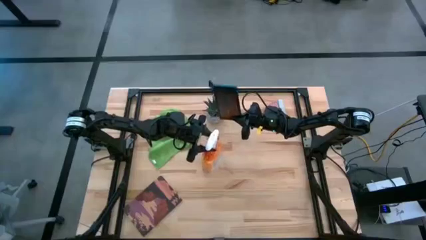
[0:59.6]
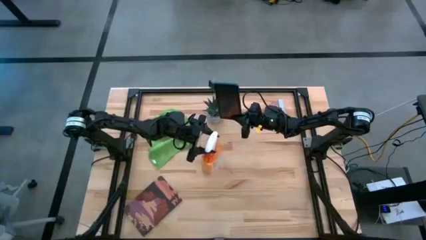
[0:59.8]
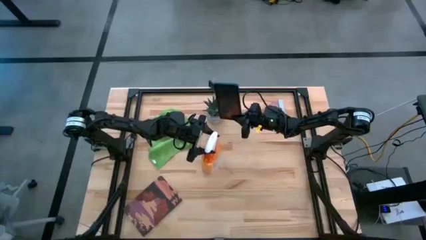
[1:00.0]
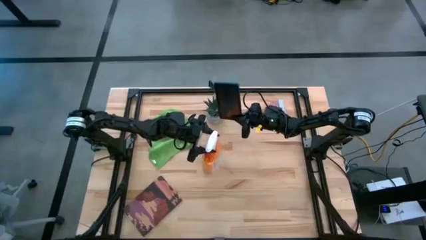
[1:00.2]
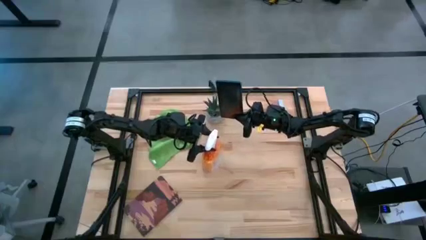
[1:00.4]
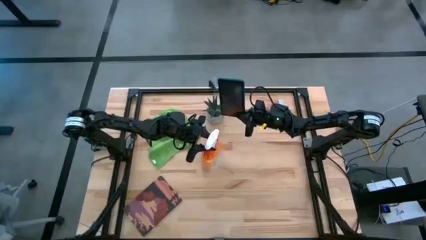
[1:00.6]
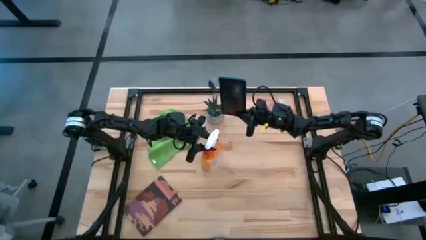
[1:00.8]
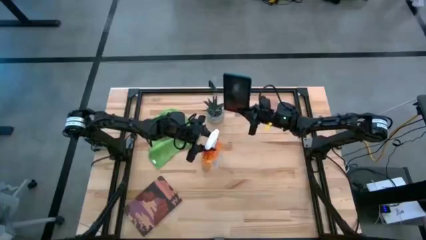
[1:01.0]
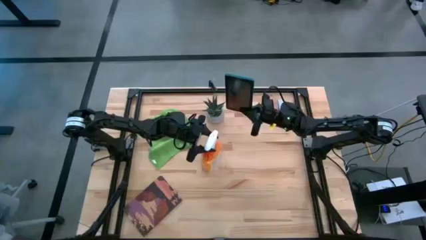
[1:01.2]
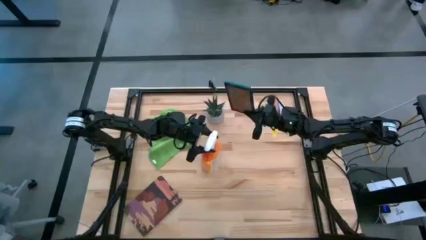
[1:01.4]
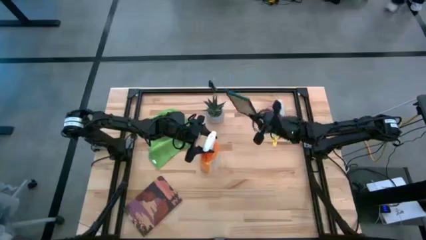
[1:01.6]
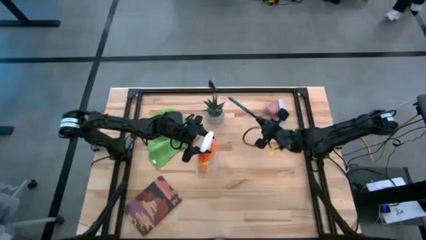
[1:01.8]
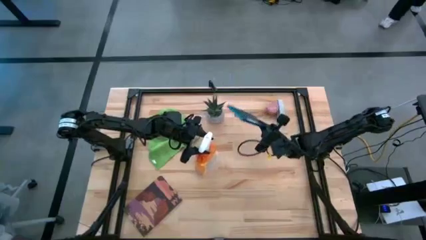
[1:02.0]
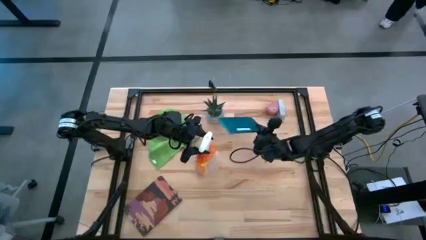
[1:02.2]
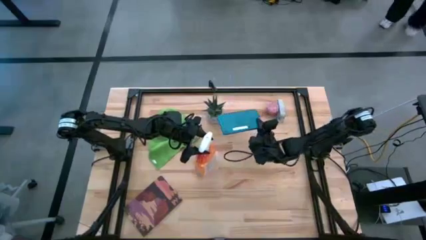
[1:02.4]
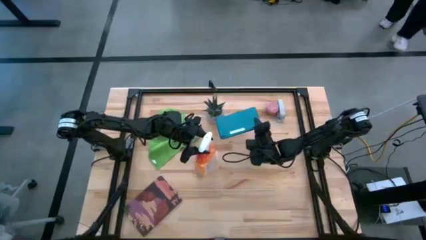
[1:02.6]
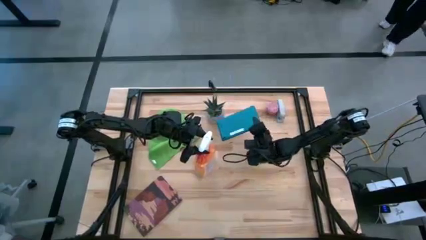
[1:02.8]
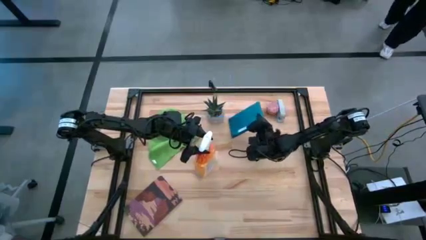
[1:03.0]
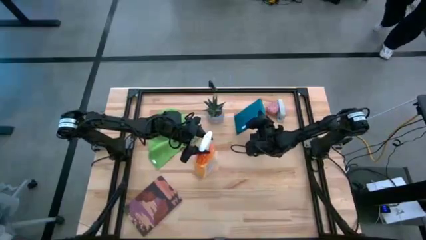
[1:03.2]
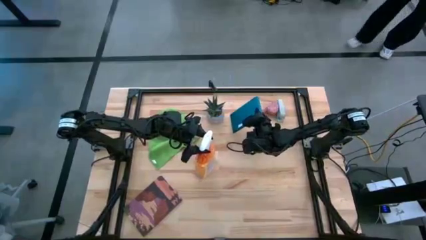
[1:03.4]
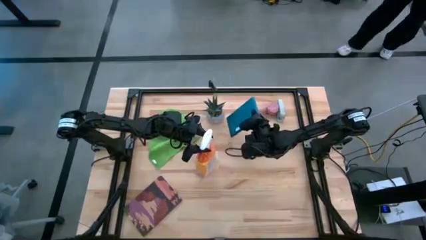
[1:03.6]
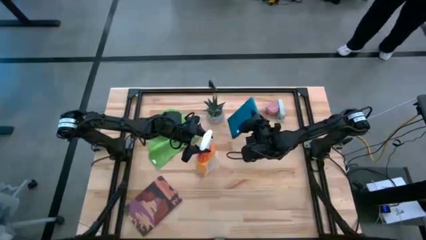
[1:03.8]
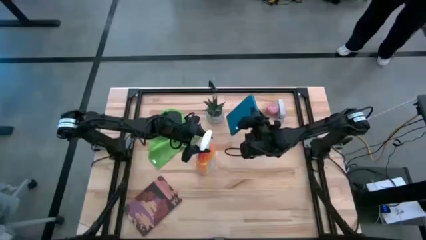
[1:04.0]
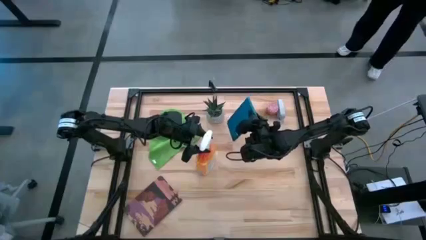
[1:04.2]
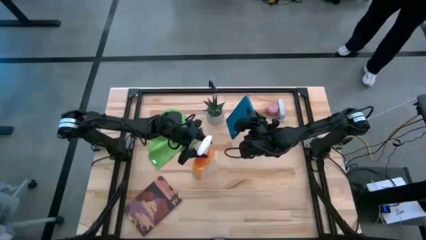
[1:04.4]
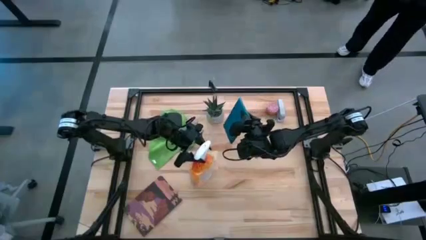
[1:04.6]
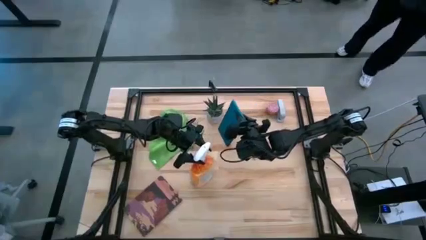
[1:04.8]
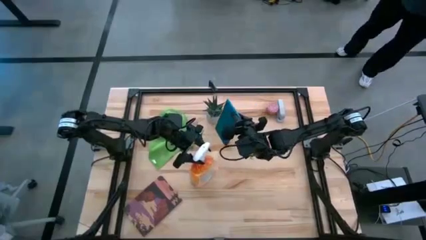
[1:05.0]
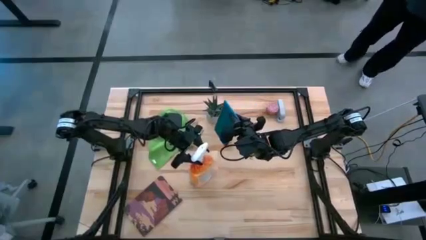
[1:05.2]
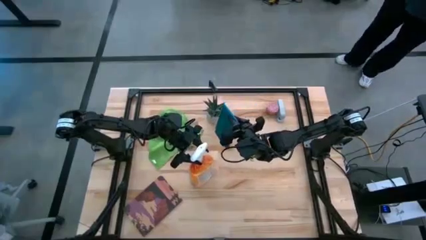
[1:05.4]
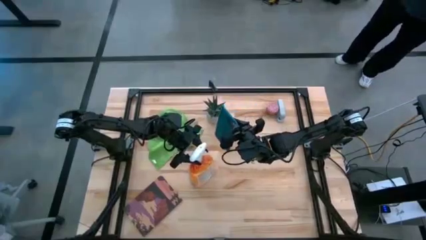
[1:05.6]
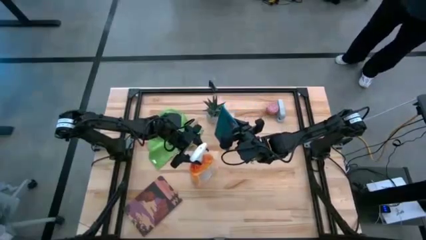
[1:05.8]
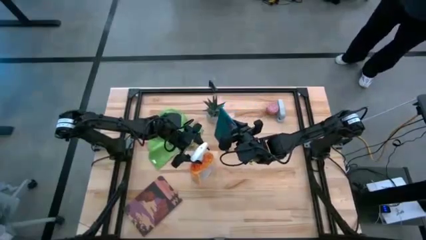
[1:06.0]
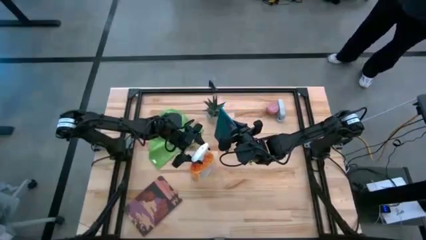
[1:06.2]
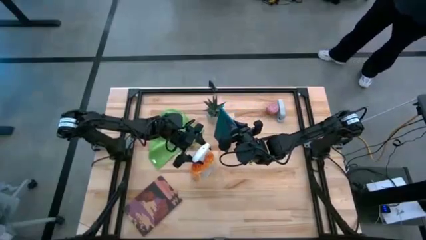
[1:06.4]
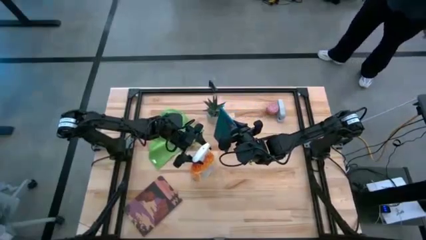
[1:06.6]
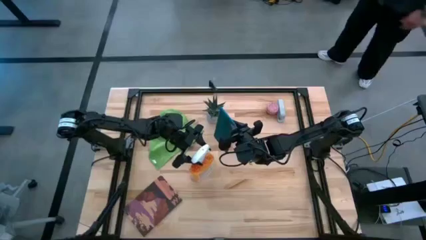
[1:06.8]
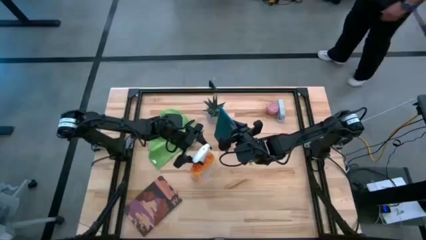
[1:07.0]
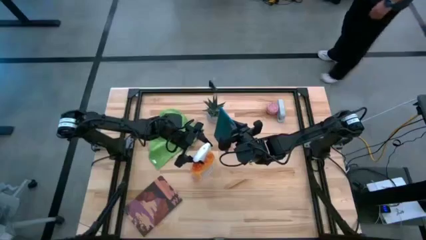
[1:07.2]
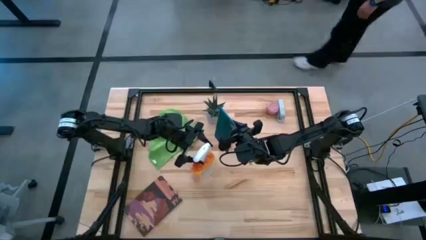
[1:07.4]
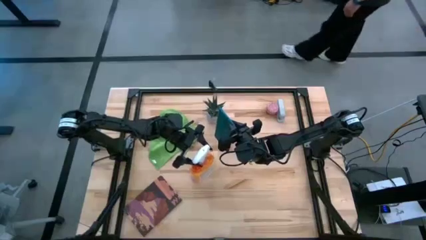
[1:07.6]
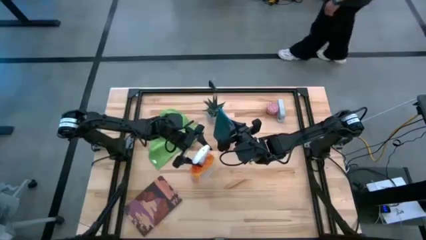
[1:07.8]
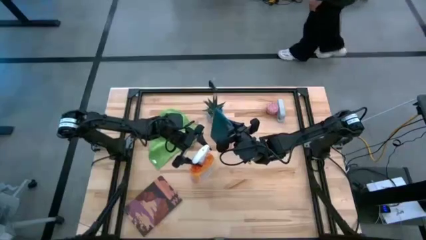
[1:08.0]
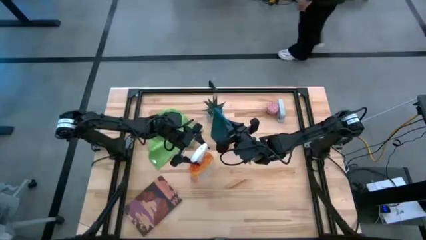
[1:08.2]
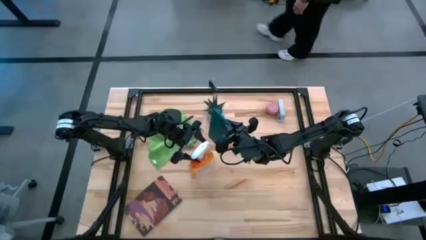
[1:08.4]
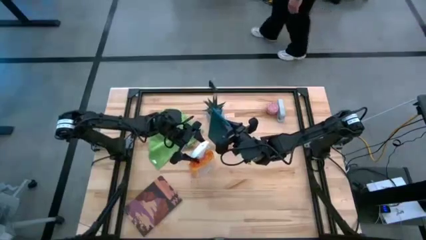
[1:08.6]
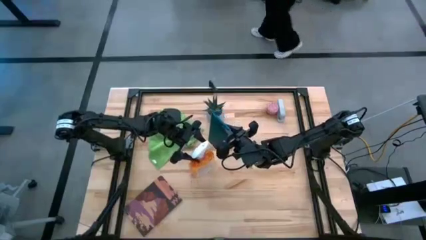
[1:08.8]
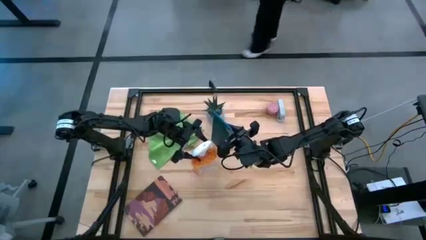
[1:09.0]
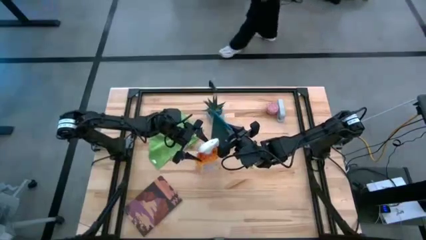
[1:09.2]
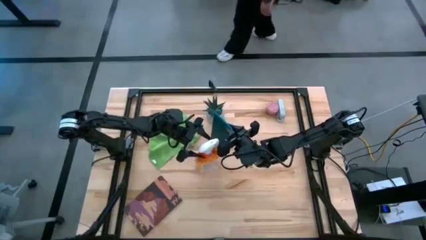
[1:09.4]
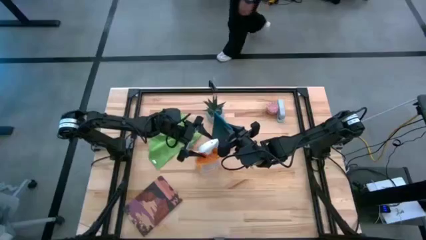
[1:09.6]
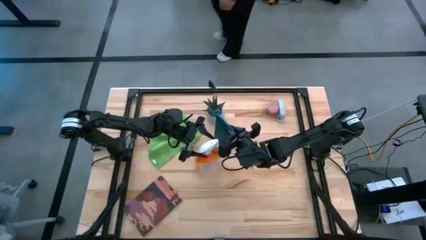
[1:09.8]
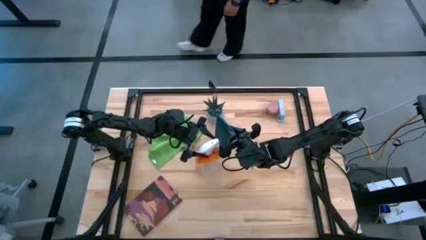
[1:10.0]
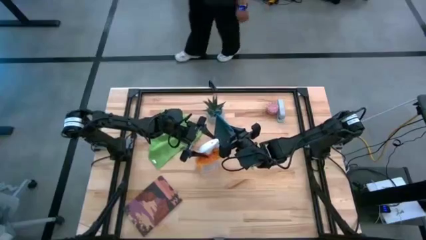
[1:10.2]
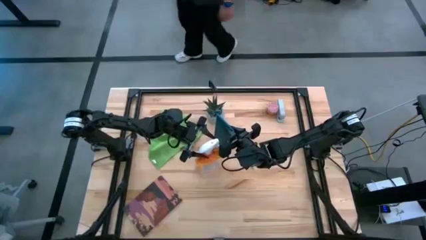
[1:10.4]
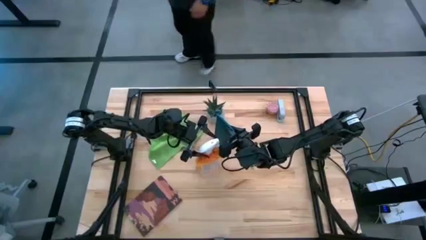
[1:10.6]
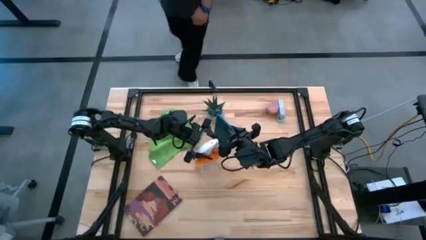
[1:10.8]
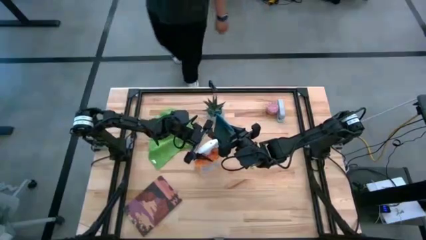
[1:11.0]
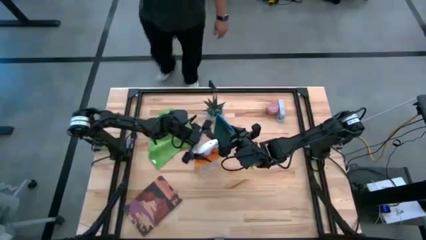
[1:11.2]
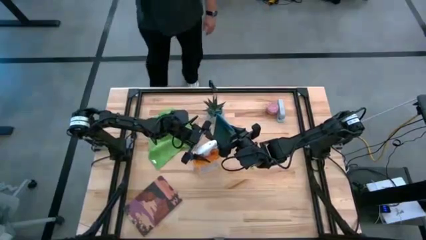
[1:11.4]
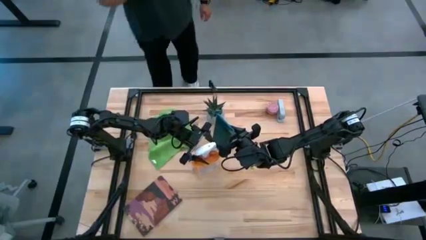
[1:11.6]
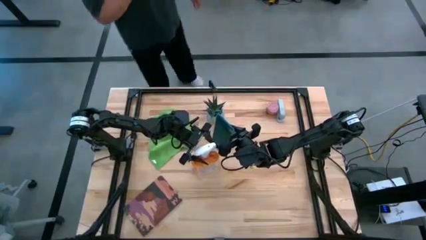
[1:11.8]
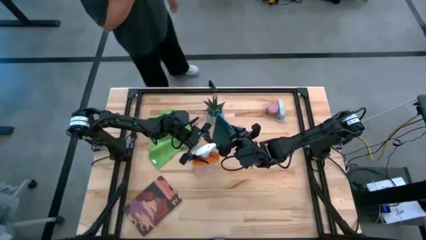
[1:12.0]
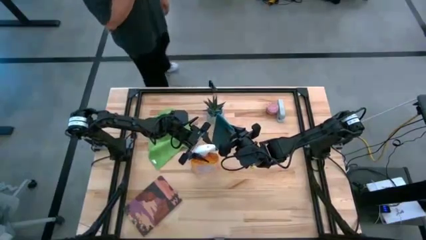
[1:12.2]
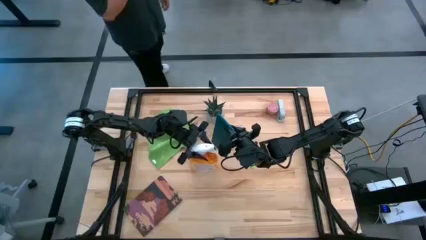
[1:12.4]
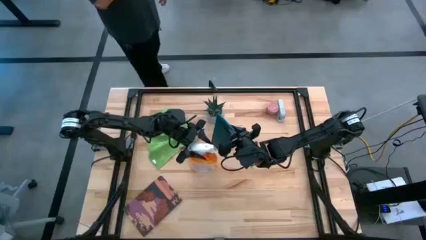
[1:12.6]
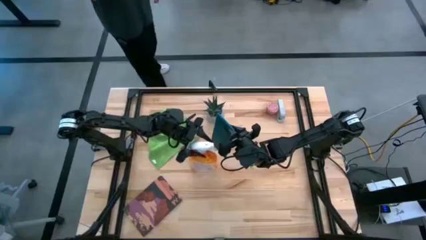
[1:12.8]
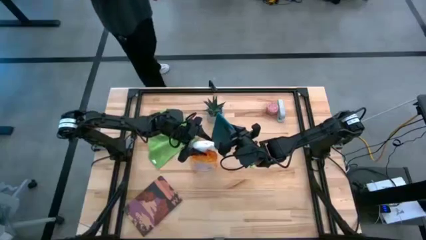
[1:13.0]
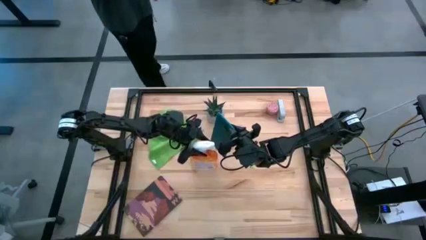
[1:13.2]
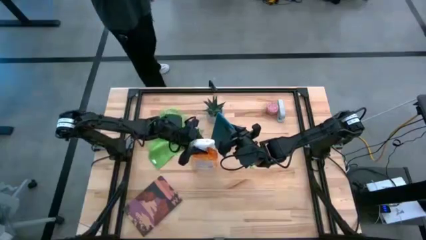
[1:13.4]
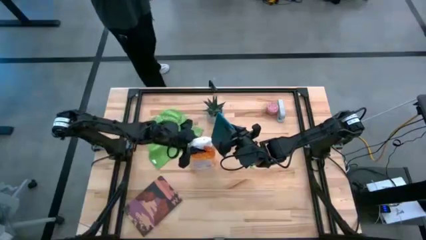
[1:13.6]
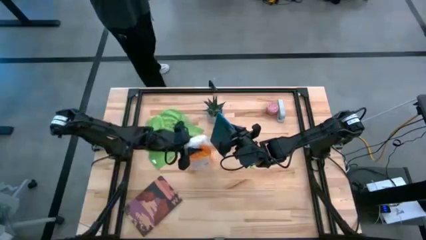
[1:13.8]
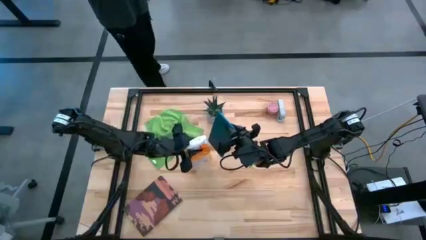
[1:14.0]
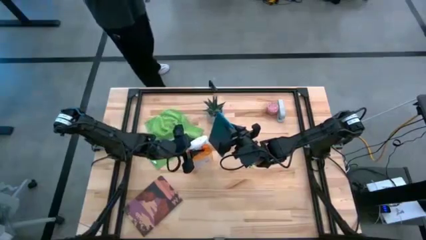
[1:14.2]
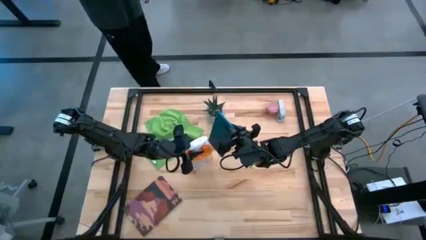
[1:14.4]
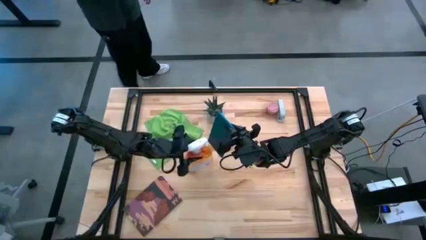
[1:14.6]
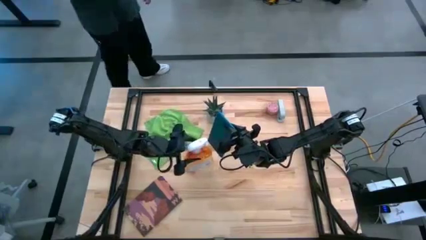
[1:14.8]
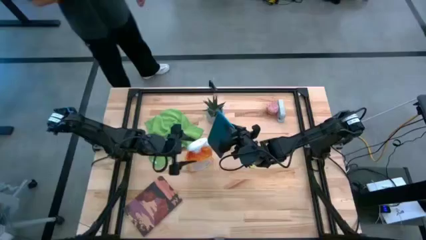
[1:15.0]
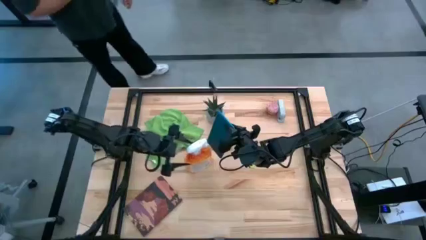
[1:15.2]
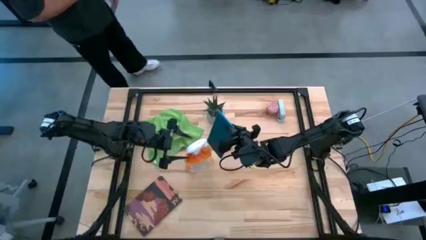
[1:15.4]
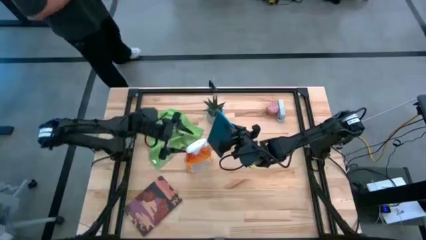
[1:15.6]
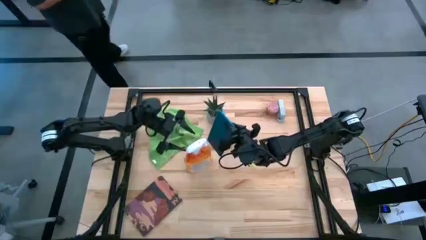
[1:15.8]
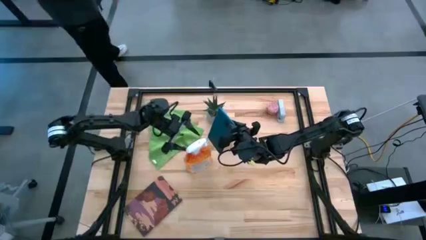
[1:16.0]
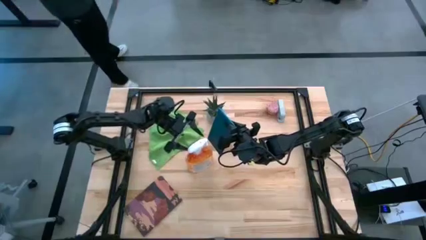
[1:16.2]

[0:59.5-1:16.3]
Task: Apply microfiber cloth
Spray the front and back of the tablet with the spray bottle
